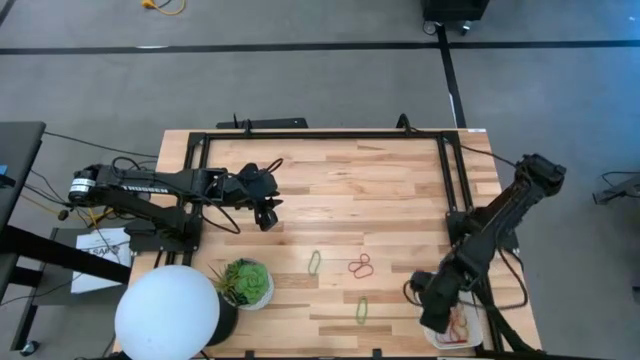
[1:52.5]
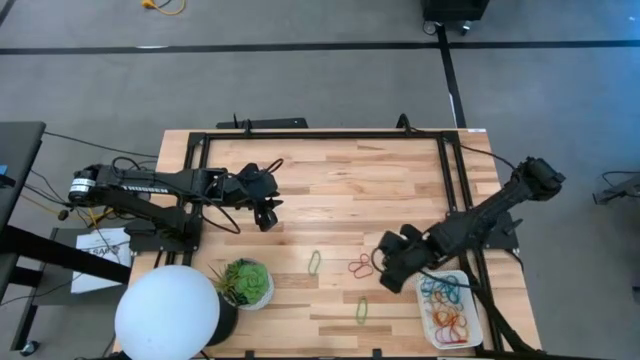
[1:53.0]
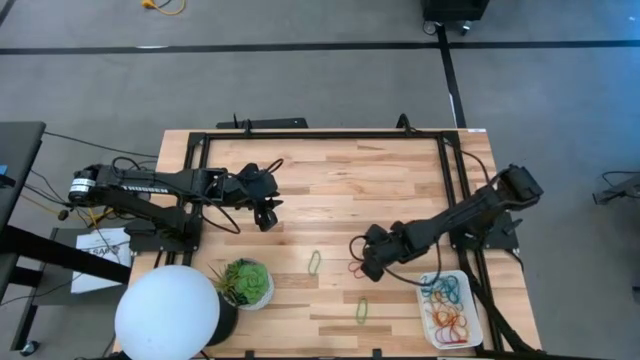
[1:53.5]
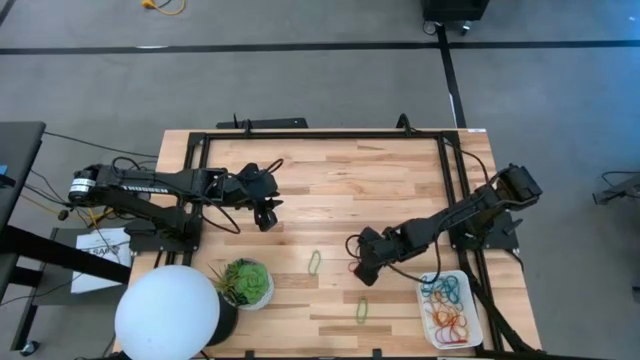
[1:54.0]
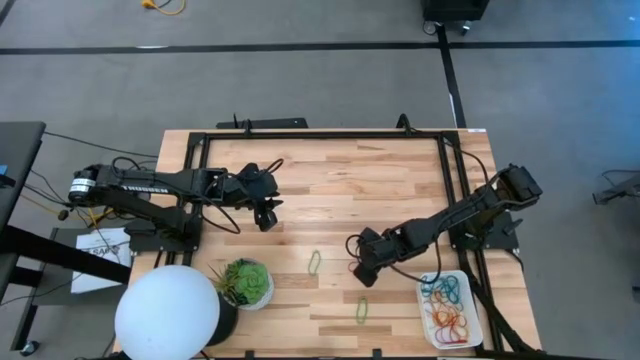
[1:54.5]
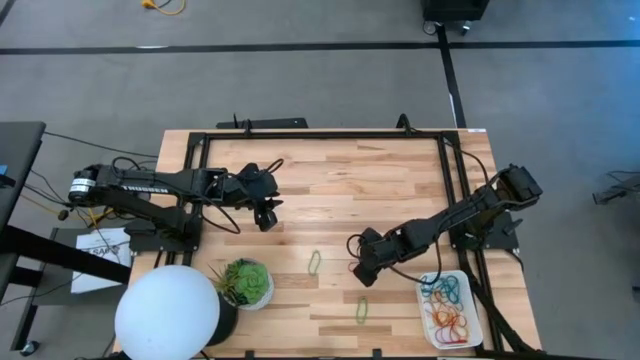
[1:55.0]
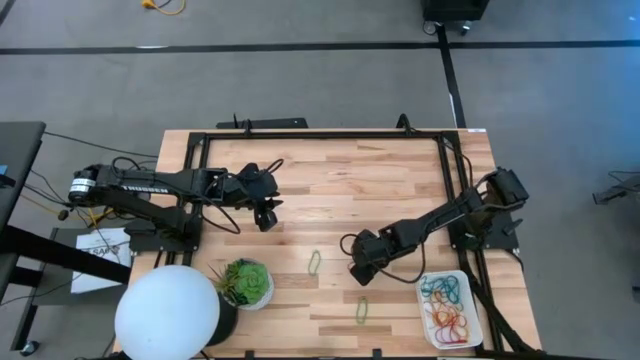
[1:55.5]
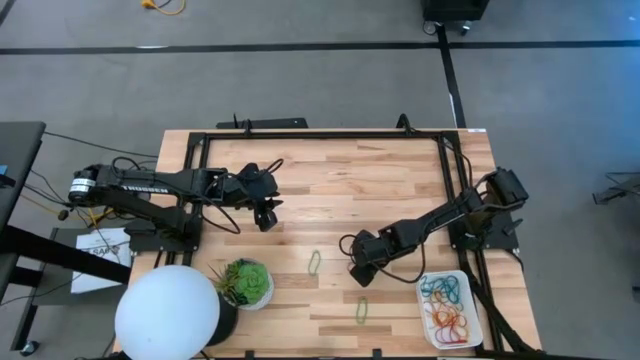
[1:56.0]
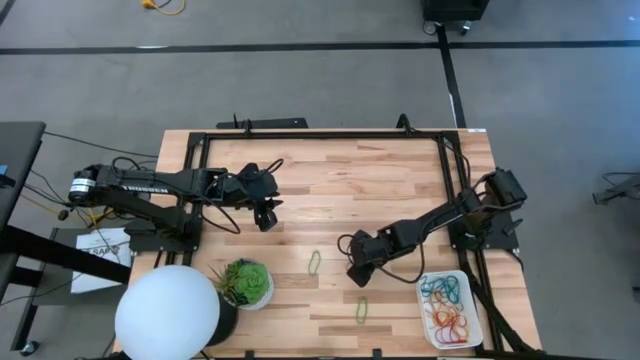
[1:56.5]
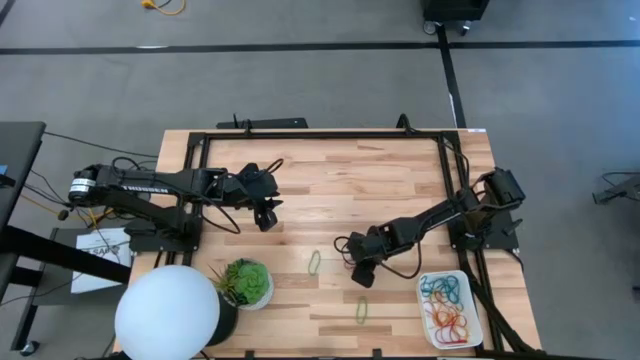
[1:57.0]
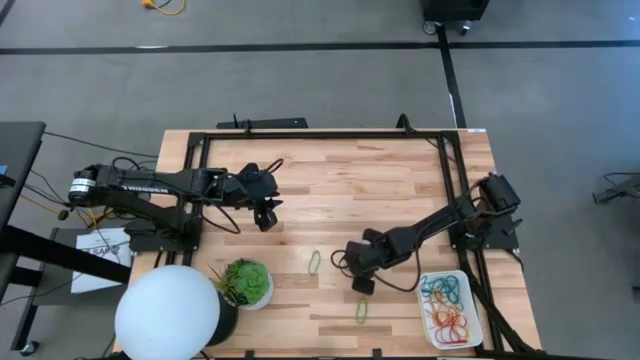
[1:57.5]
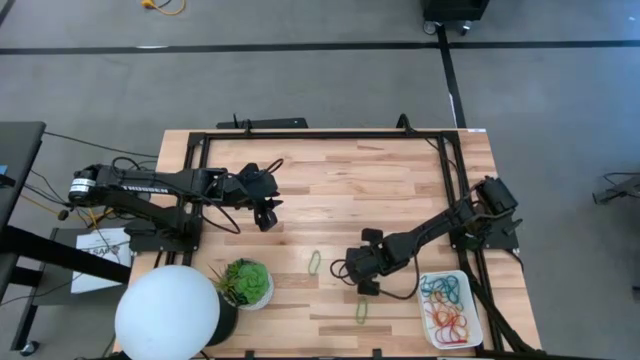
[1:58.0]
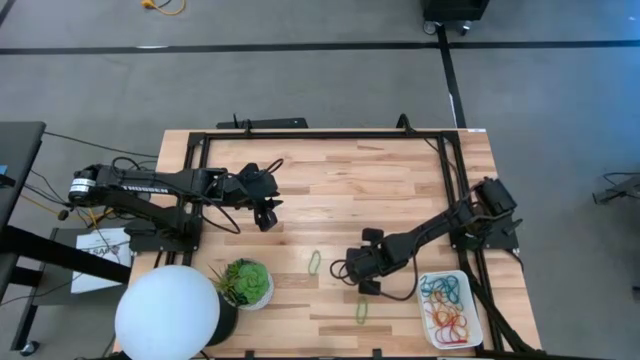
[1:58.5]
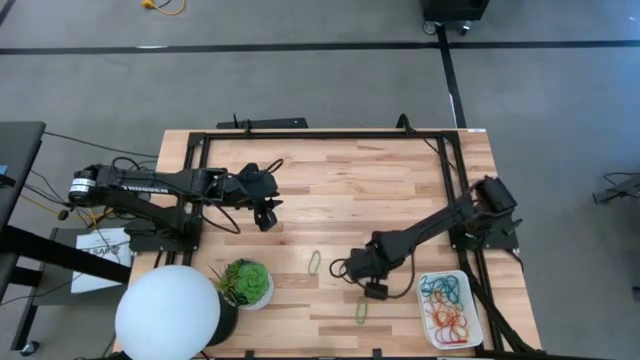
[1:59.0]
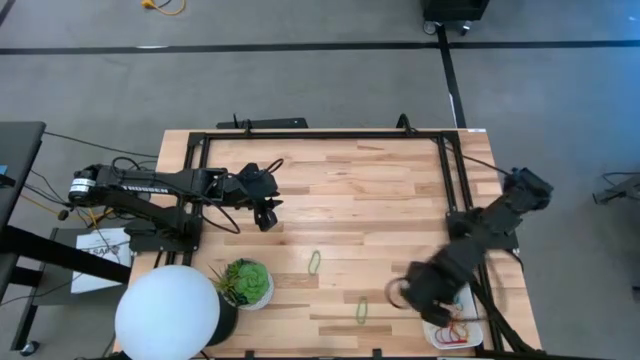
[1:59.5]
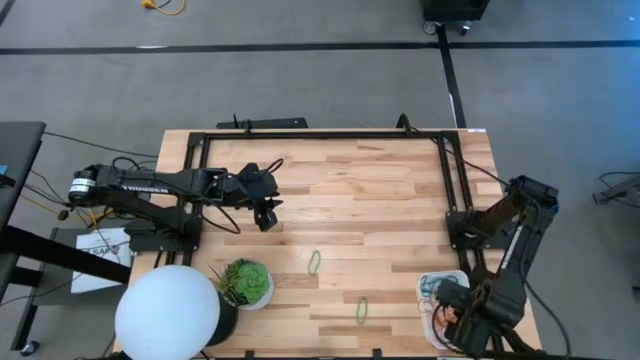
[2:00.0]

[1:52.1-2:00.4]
Task: Pick and place items into bin
Put the red rubber band into the white bin

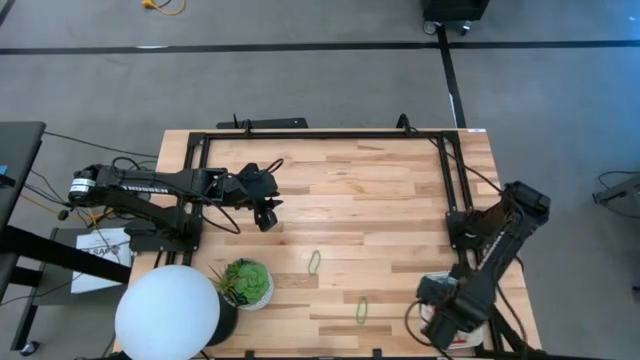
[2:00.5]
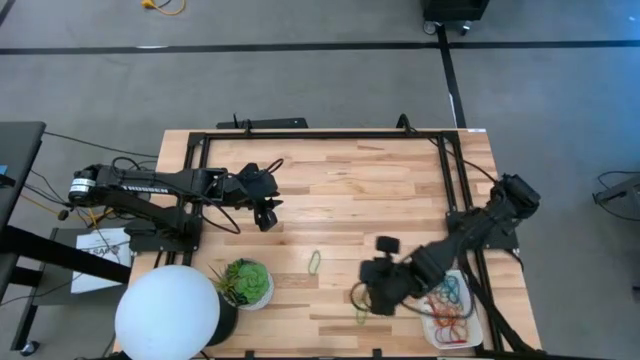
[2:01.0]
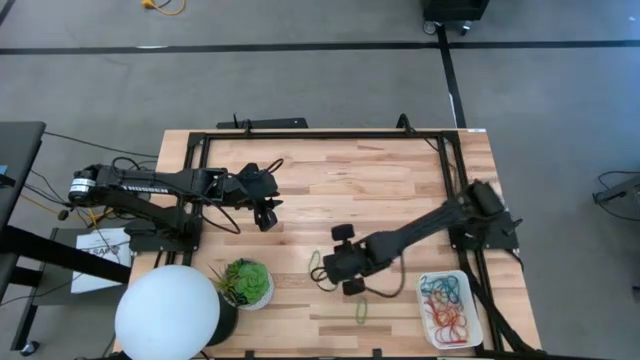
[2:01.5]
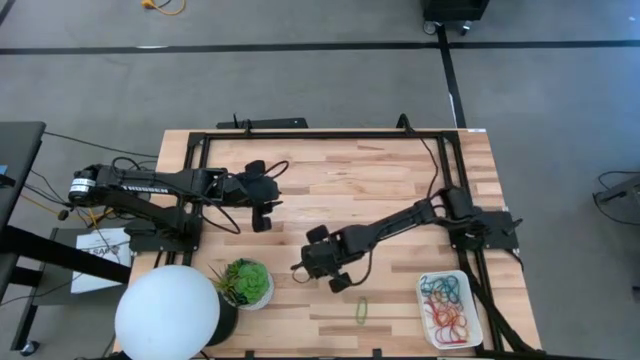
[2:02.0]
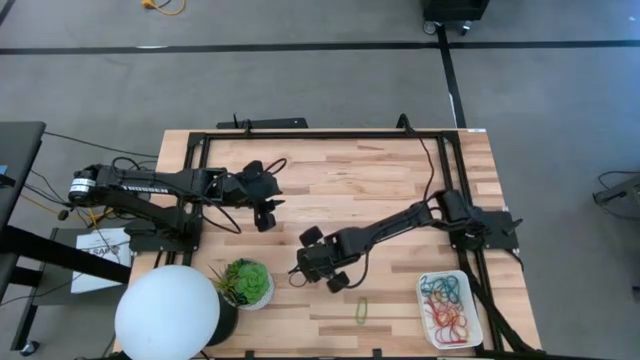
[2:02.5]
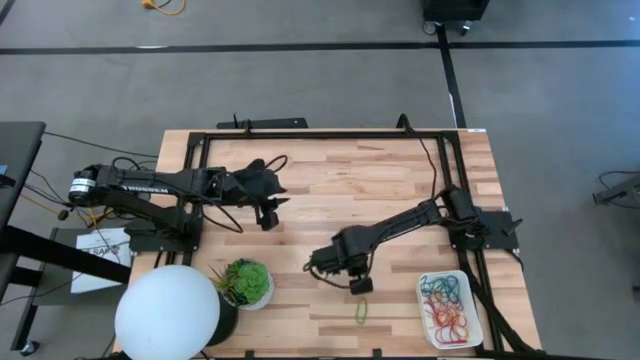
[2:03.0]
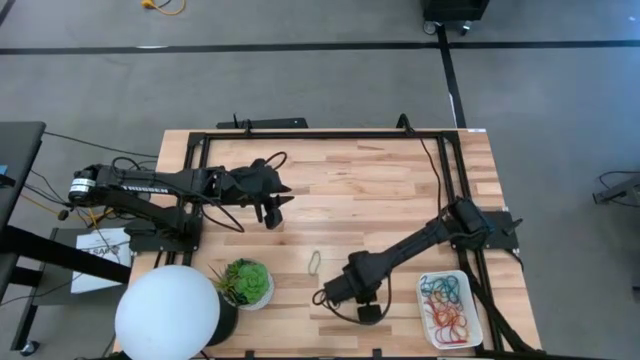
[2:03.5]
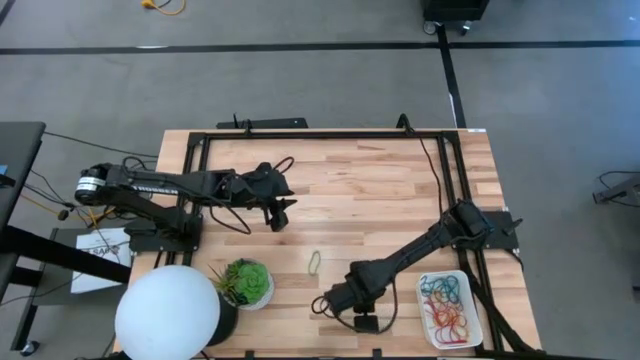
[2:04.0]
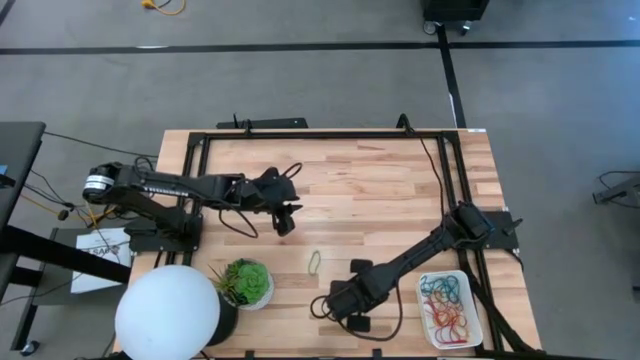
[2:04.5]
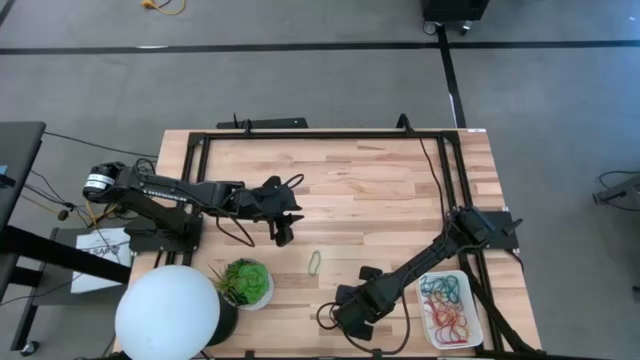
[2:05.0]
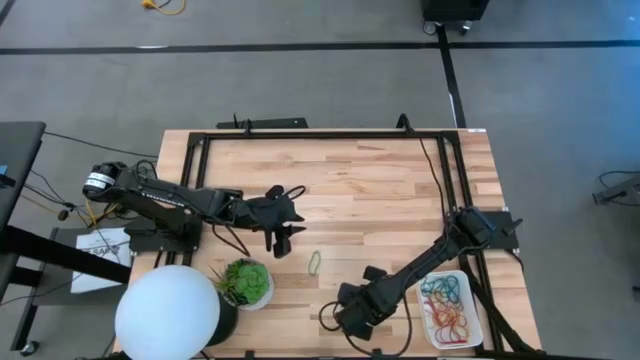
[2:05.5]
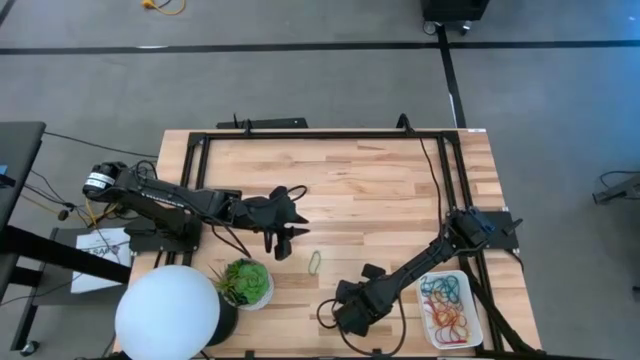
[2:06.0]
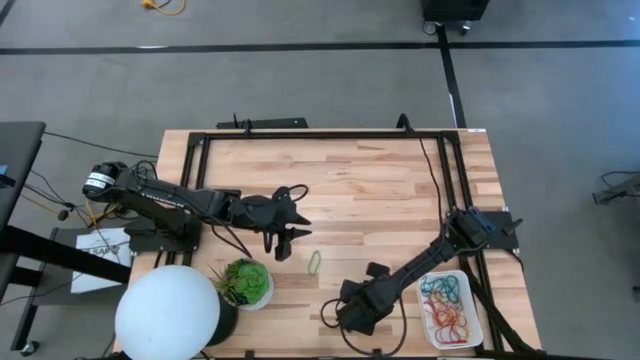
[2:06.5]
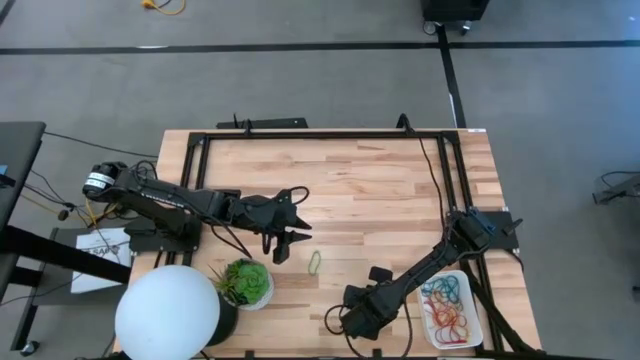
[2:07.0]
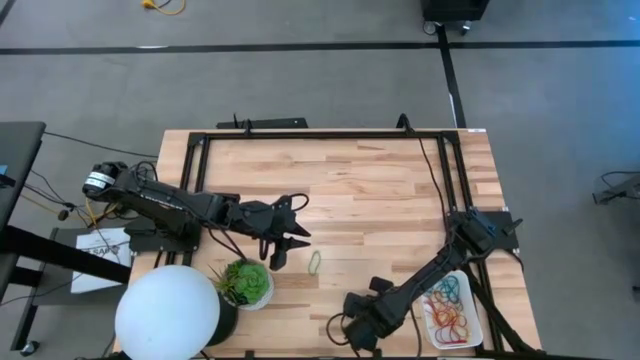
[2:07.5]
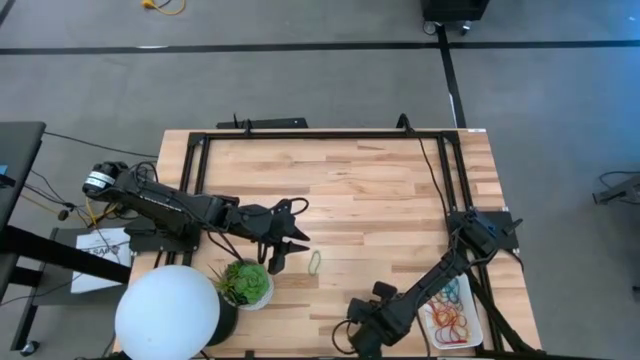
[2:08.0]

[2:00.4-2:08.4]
Put the green rubber band into the white bin

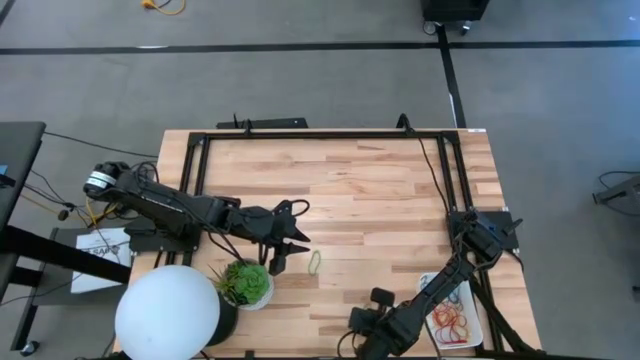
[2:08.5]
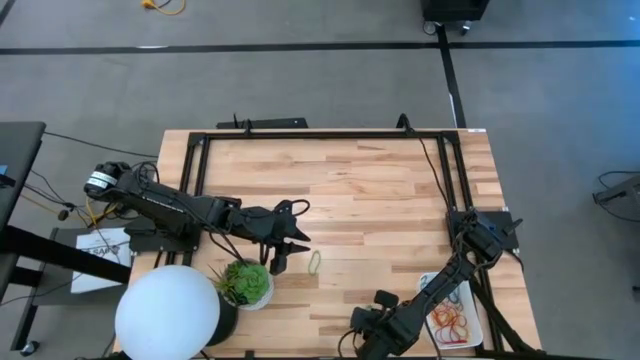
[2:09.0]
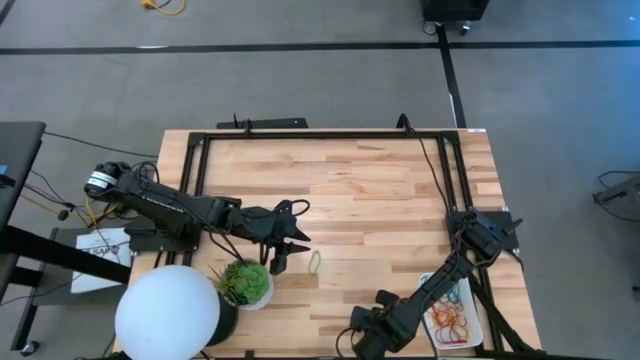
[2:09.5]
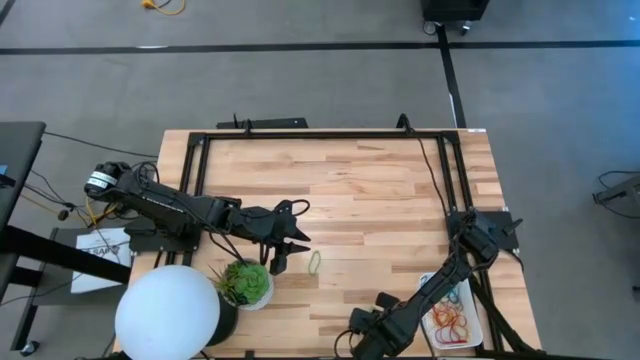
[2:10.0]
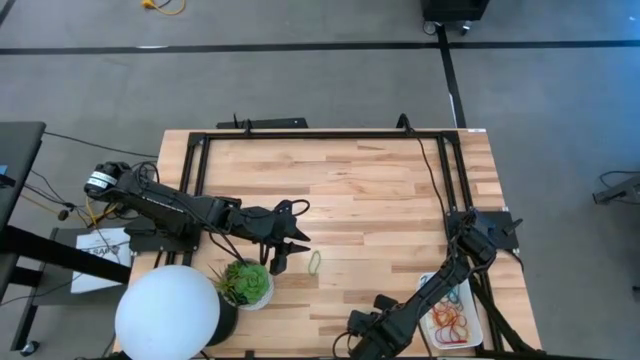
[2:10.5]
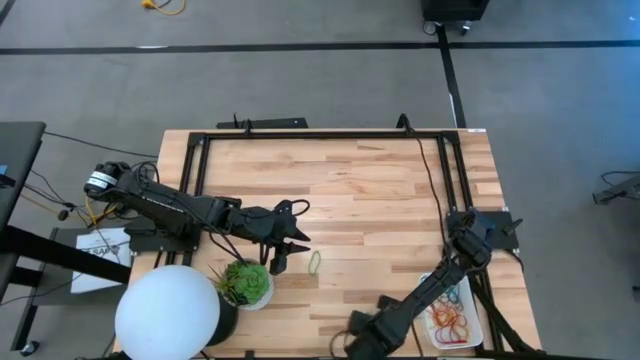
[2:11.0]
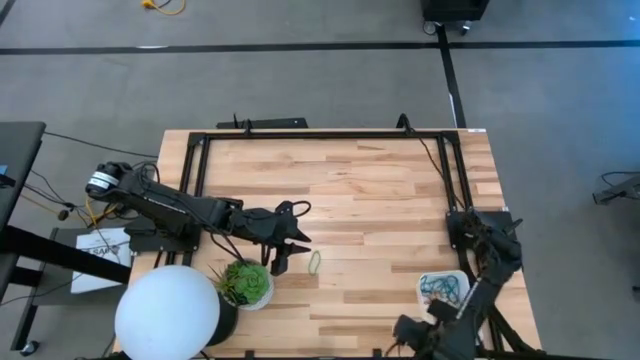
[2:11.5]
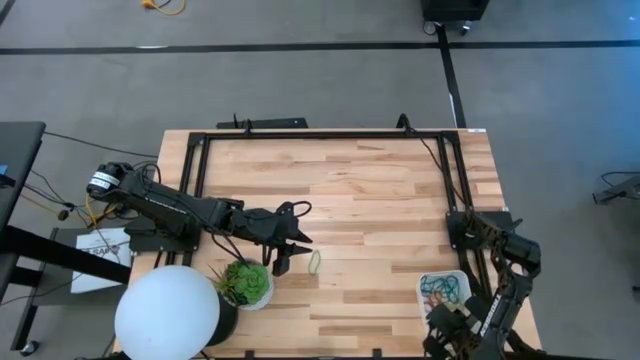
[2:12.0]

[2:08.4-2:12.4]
Put the green rubber band into the white bin

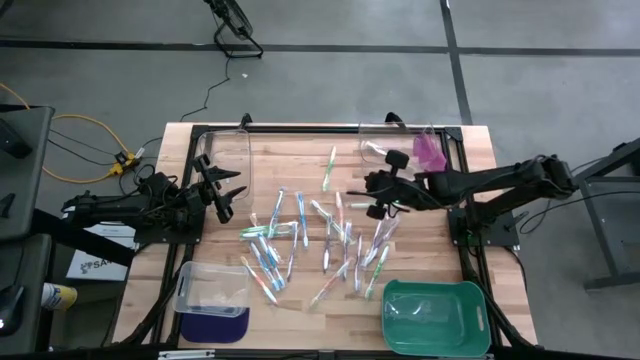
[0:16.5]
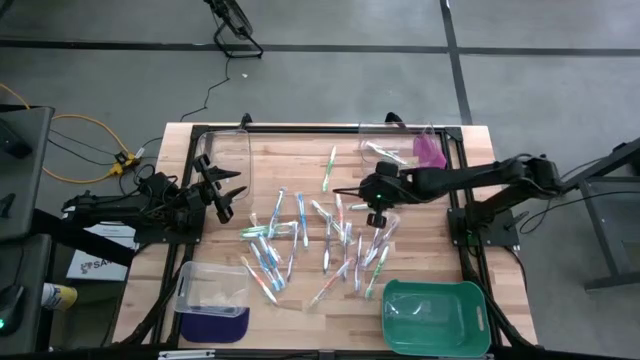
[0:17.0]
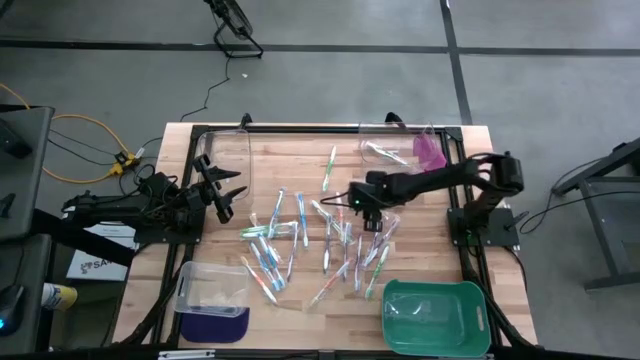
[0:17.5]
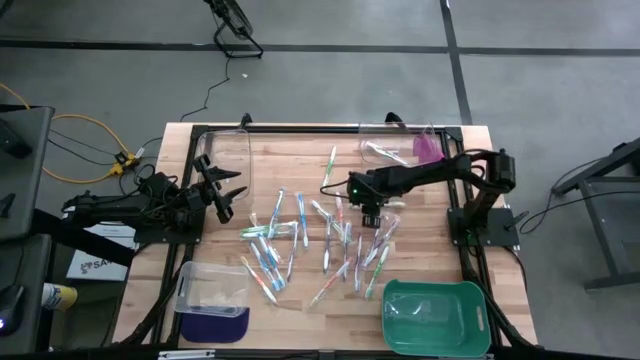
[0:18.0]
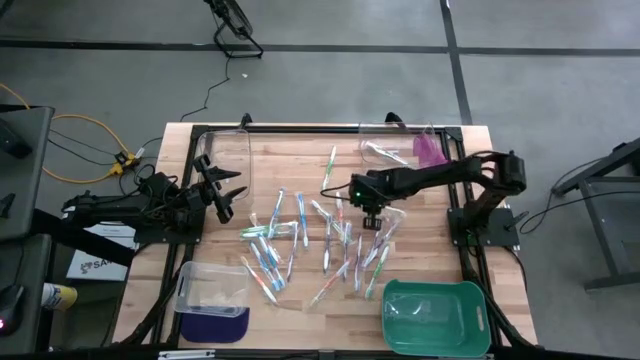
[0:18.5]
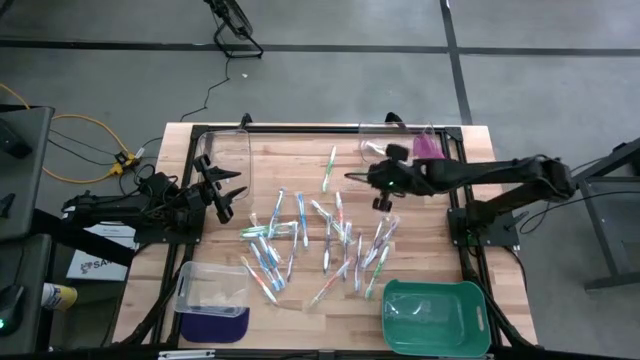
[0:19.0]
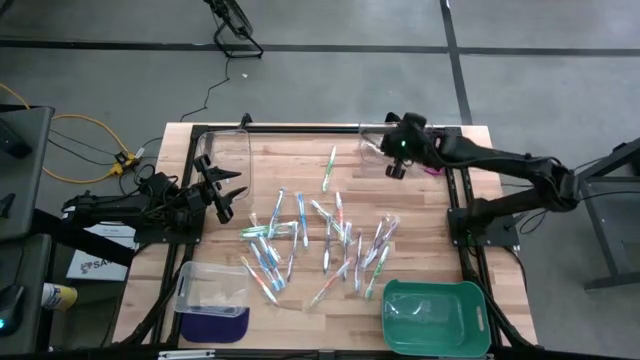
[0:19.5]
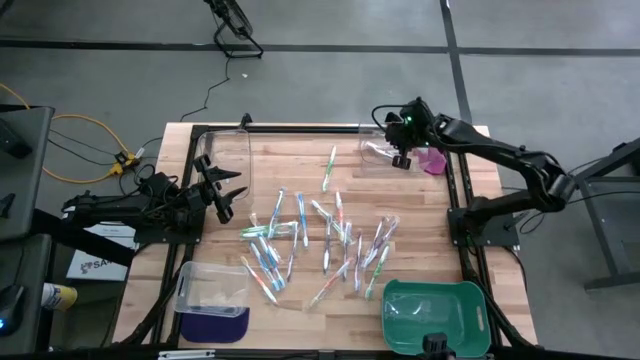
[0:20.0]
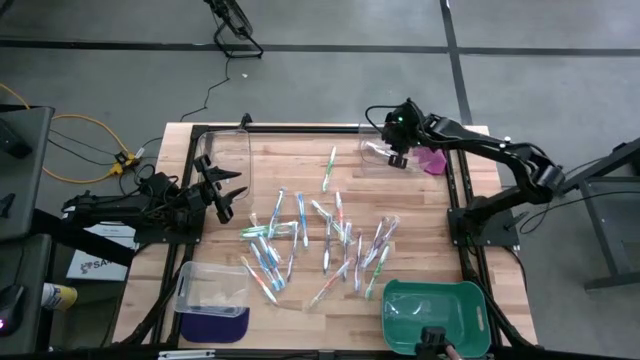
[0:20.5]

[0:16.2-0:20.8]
Task: Pick & Place Toothbrushes
Put the green toothbrush into the top right transparent bin
